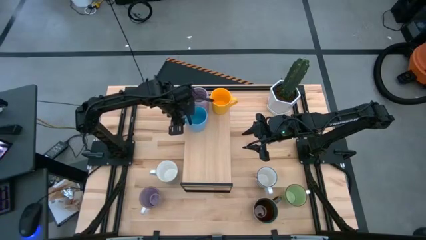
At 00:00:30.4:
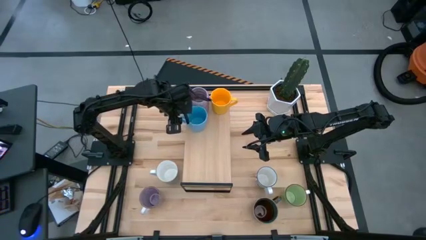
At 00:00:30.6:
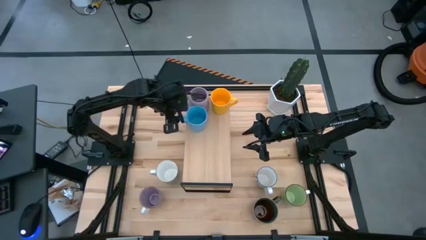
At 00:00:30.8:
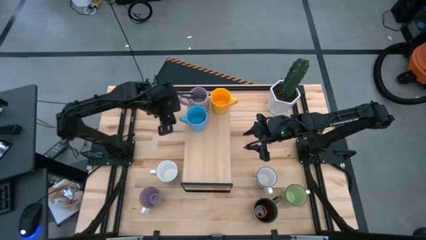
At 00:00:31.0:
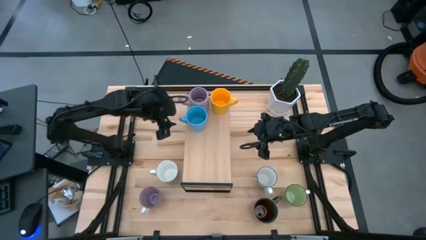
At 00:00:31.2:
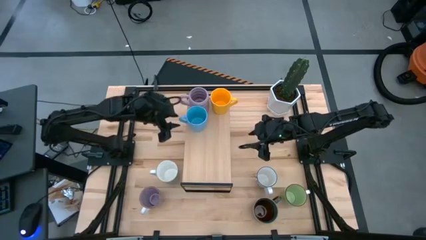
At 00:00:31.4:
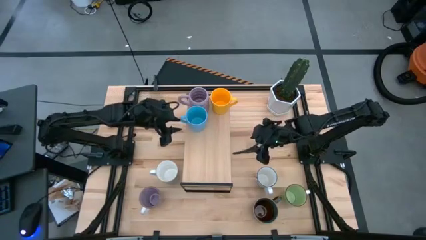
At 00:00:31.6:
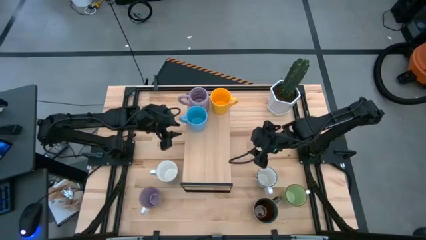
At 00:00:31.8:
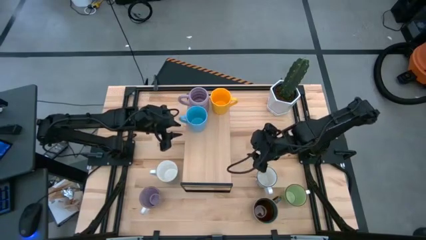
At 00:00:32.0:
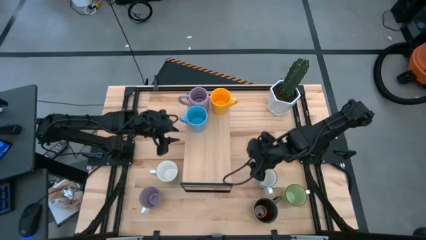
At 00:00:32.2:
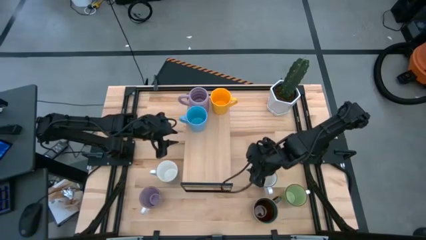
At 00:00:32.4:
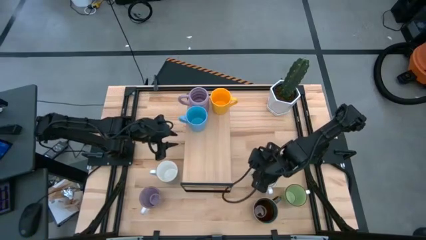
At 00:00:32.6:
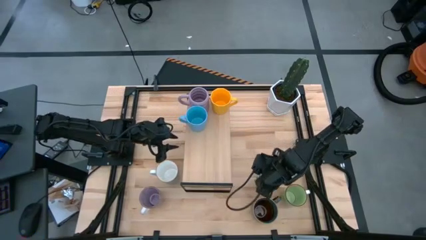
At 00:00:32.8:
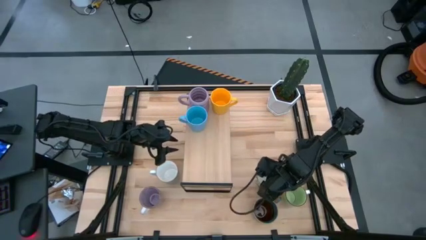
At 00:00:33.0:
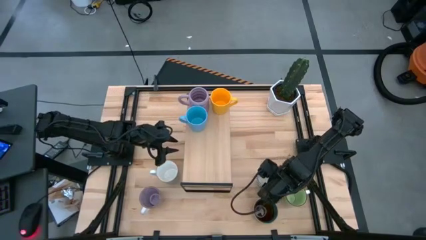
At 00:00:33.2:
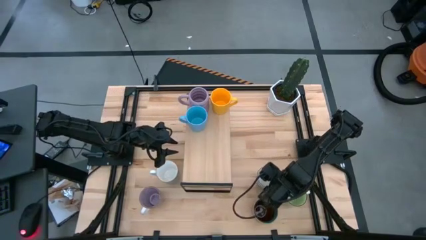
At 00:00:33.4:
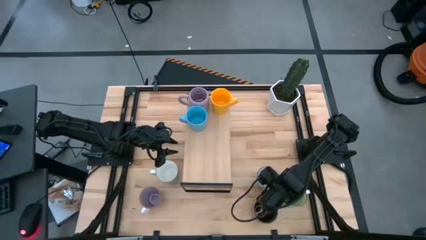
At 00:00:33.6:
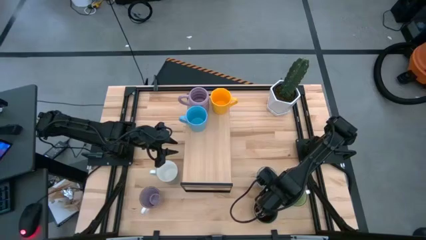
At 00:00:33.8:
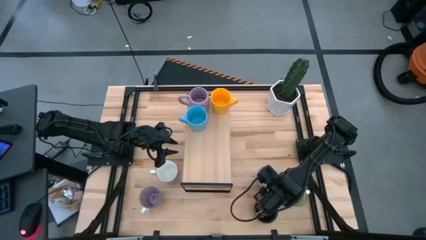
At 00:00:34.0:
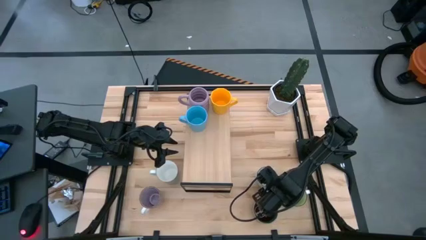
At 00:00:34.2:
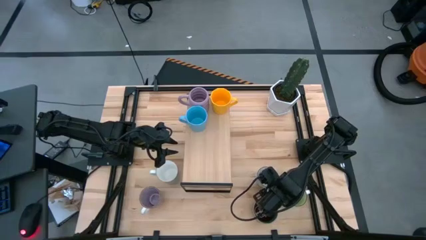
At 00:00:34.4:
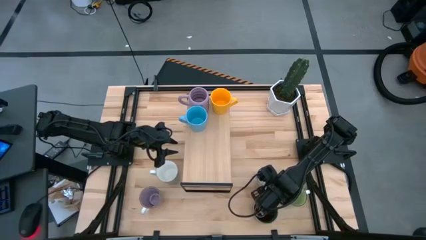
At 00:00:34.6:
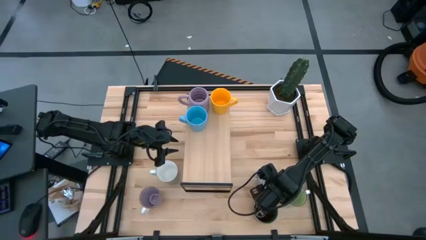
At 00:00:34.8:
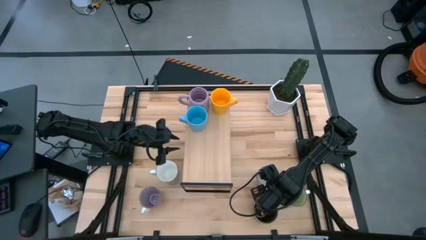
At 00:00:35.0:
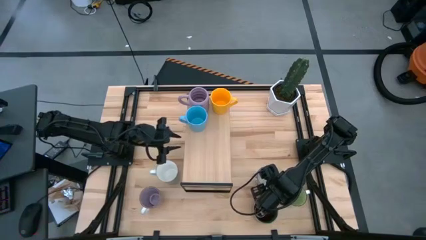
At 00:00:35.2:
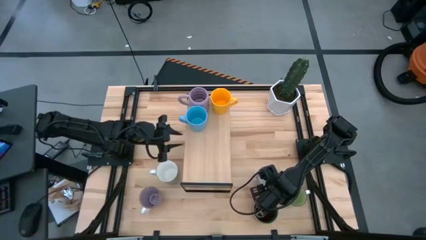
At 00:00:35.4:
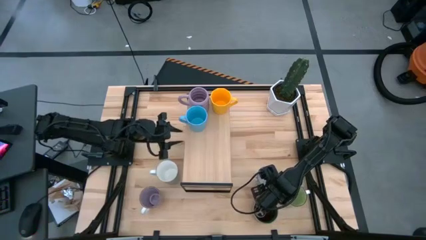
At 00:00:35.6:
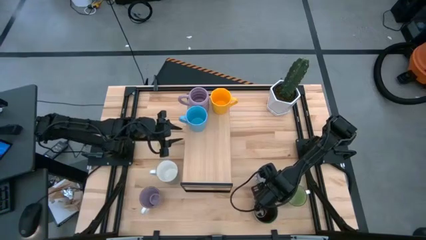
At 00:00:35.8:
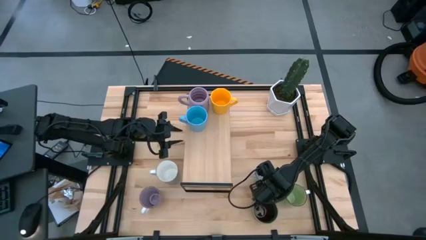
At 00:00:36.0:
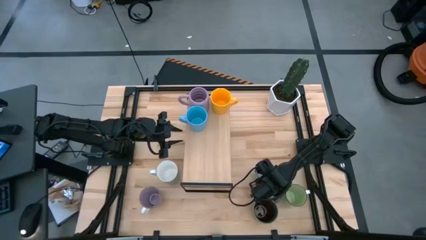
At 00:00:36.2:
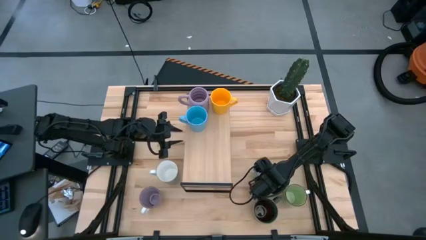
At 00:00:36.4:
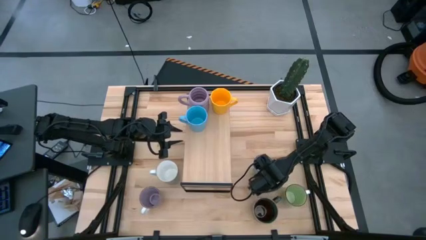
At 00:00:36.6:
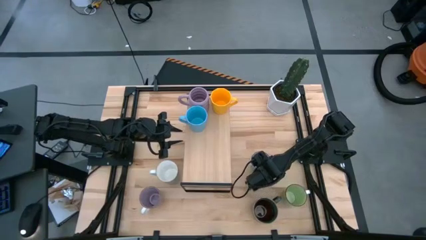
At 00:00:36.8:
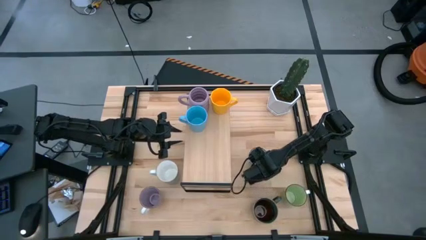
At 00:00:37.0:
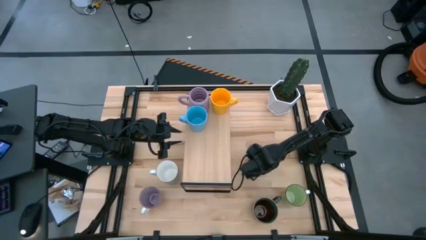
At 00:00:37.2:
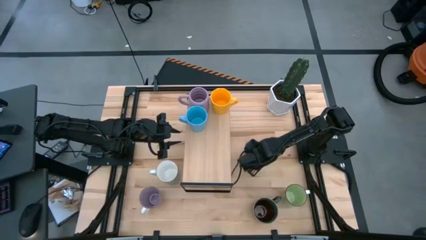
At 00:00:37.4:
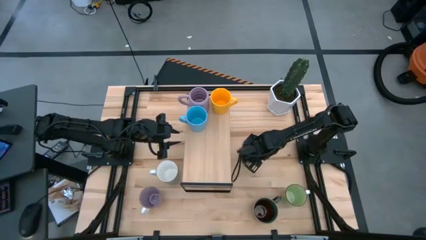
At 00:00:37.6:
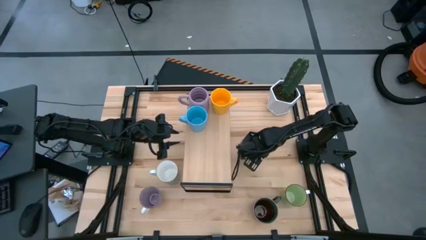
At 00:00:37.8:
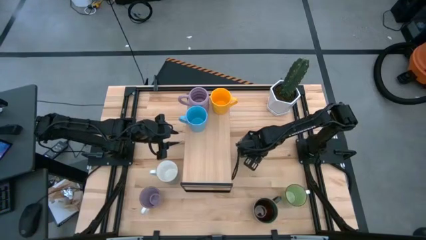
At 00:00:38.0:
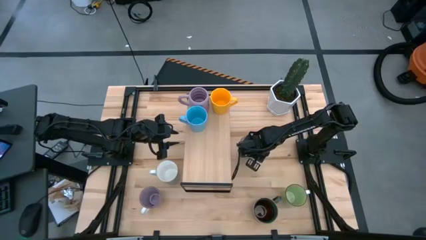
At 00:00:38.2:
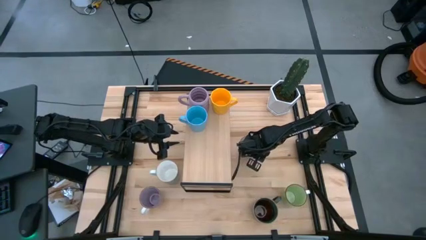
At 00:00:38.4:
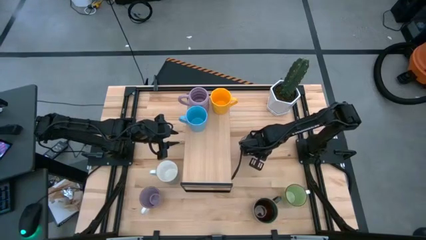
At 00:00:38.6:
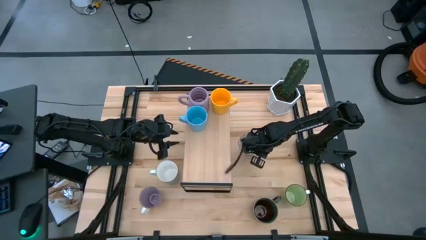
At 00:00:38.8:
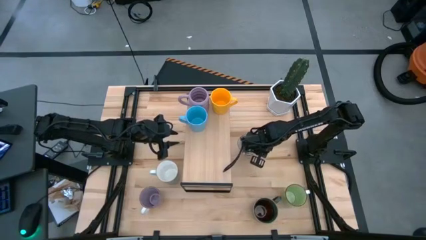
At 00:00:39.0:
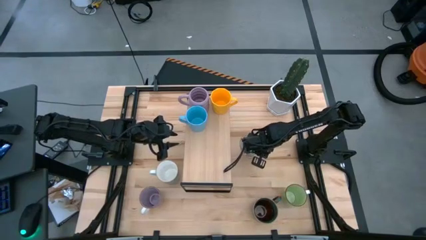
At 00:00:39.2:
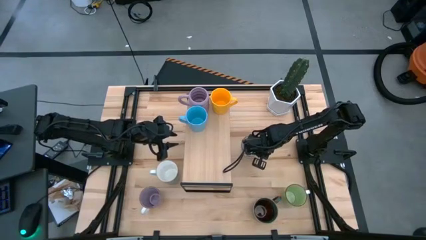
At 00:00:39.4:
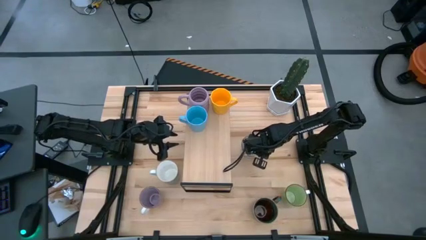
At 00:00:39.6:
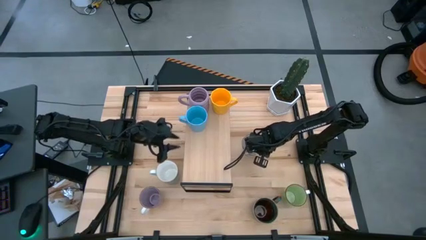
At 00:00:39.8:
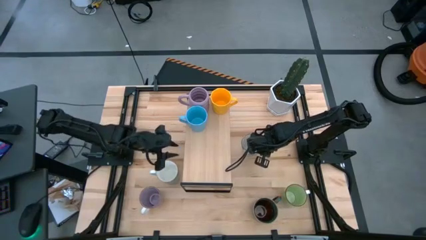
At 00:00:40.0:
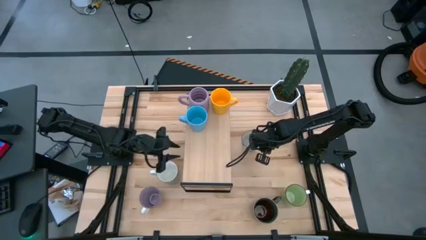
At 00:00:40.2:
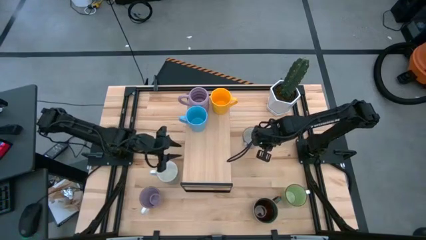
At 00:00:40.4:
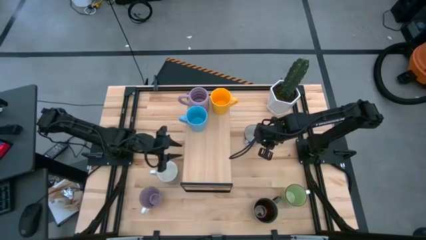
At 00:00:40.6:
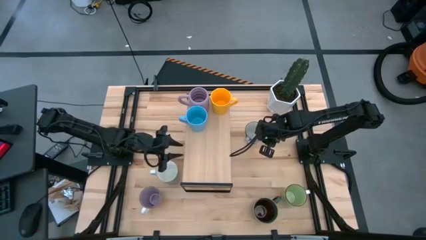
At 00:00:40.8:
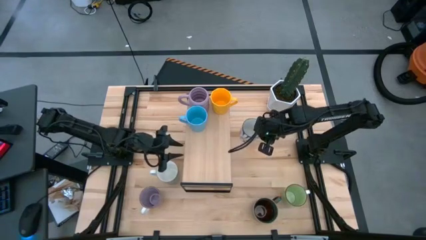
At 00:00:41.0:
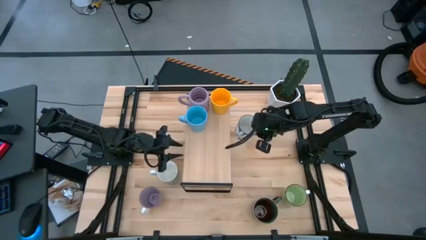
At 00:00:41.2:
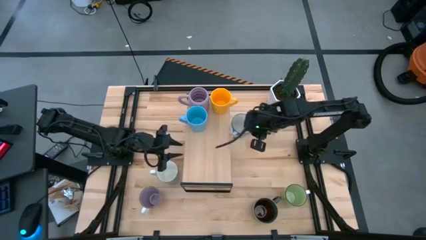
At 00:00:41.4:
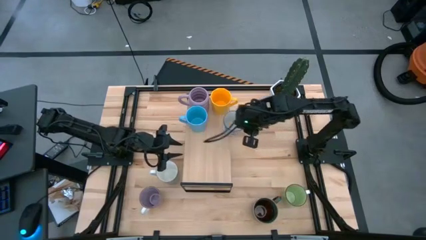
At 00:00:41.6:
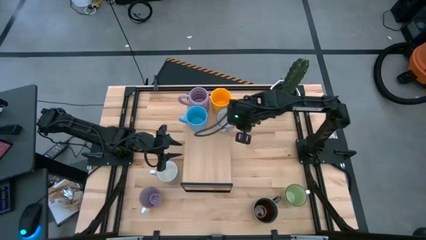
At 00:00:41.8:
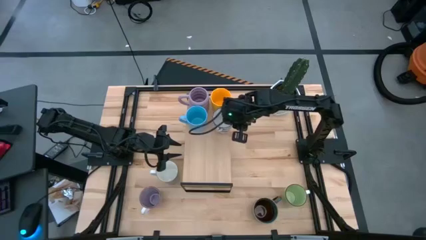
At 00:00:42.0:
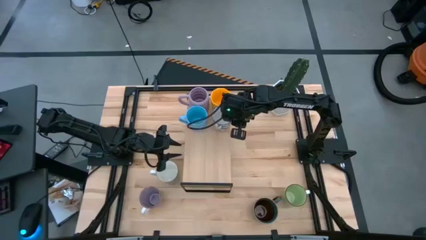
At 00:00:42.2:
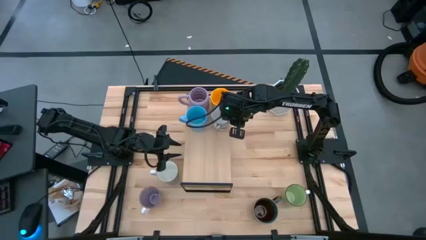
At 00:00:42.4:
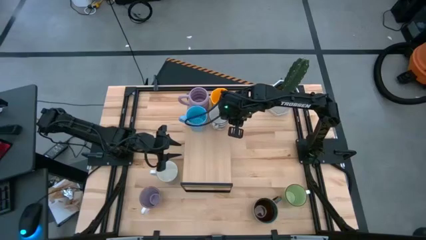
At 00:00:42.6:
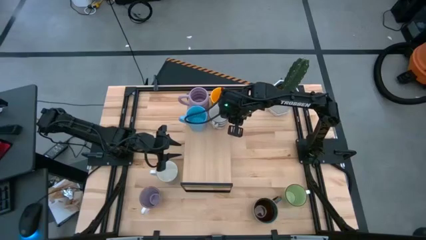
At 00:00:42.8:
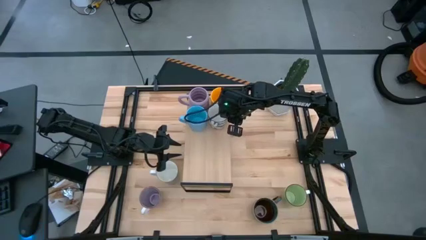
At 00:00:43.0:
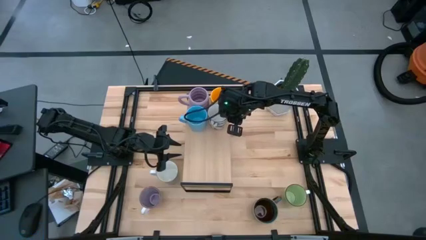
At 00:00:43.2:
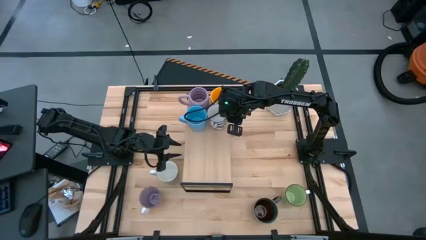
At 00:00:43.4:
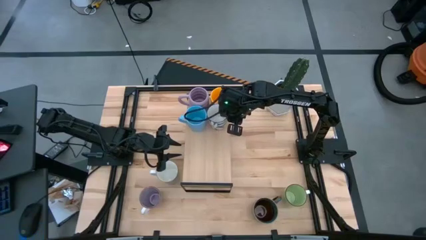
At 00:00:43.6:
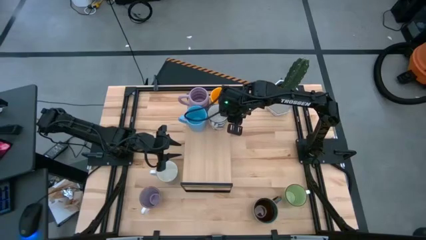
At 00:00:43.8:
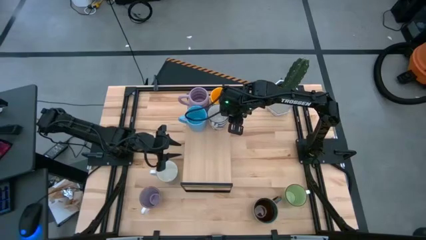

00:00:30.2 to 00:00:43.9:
Task: Place coffee mugs
Put the dark blue mug on the shelf
